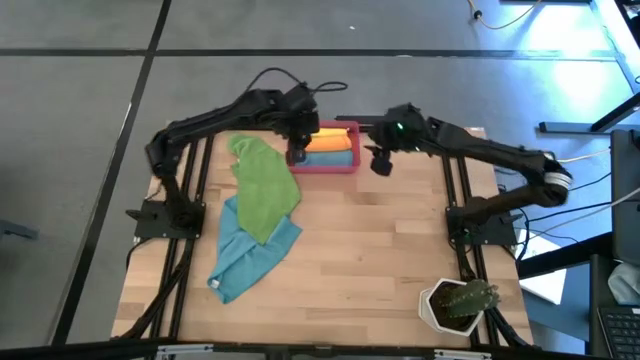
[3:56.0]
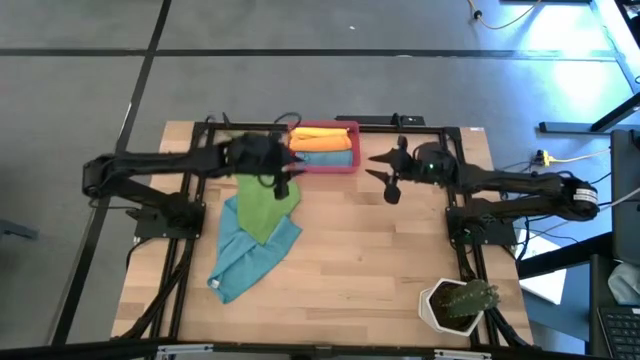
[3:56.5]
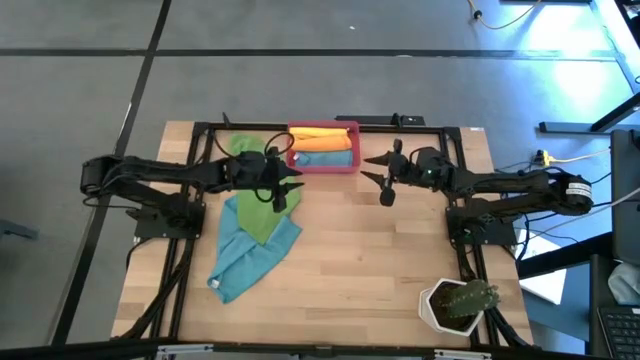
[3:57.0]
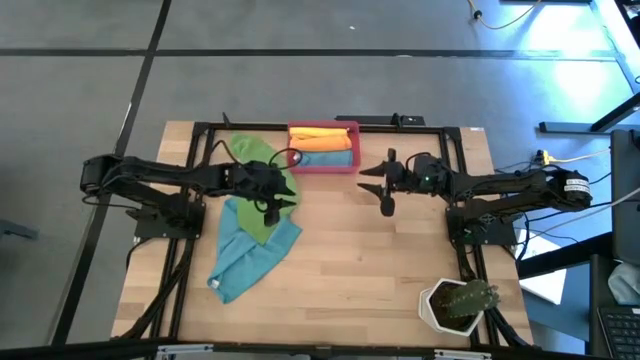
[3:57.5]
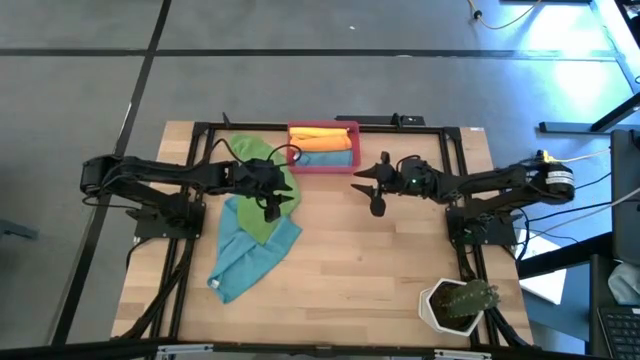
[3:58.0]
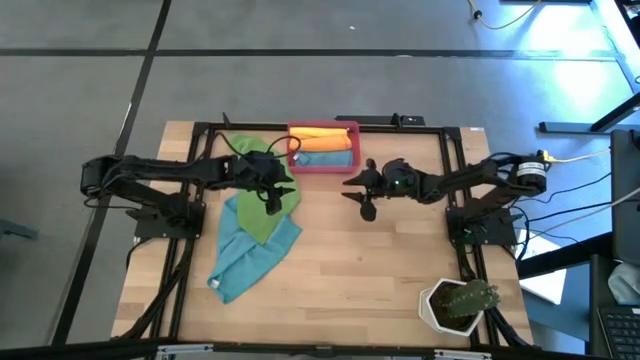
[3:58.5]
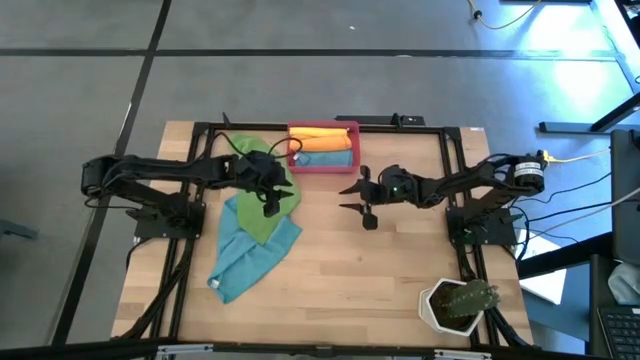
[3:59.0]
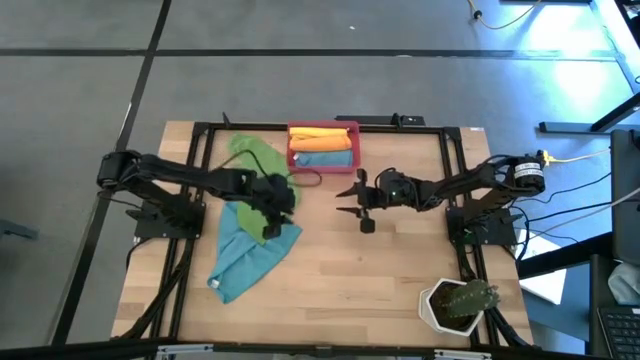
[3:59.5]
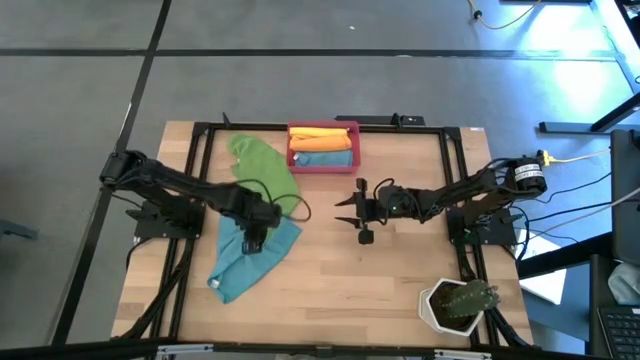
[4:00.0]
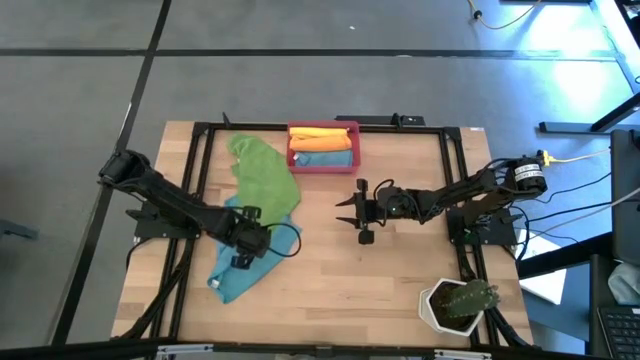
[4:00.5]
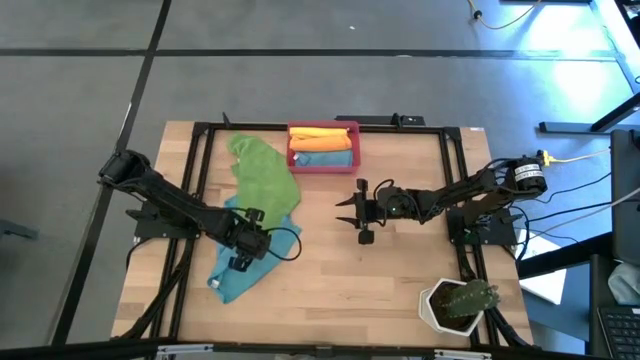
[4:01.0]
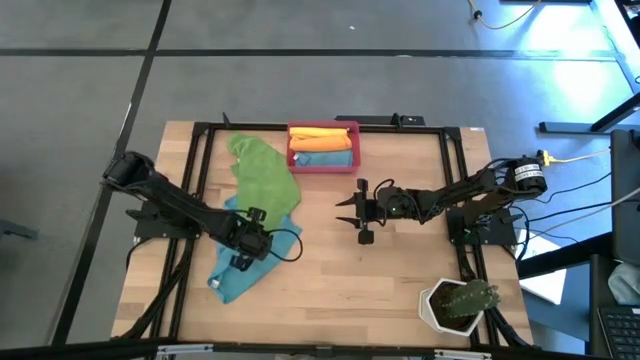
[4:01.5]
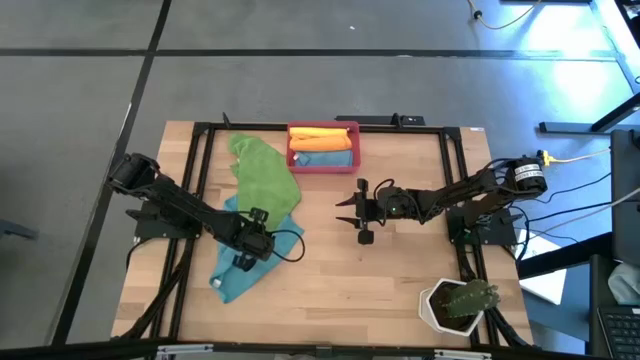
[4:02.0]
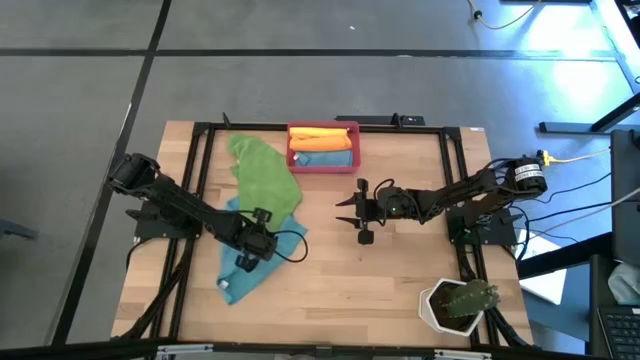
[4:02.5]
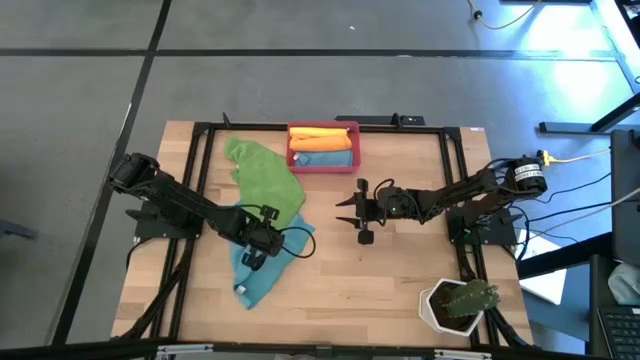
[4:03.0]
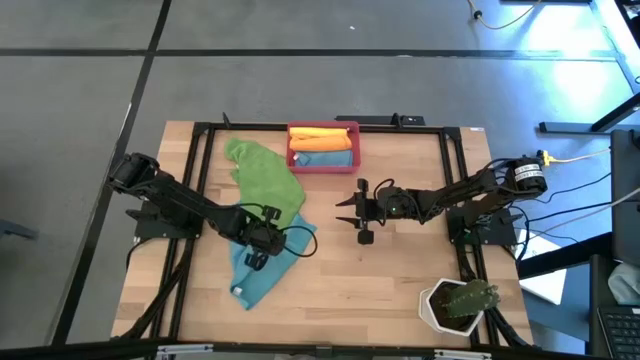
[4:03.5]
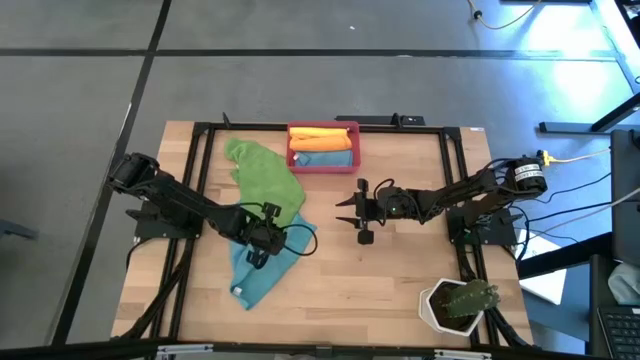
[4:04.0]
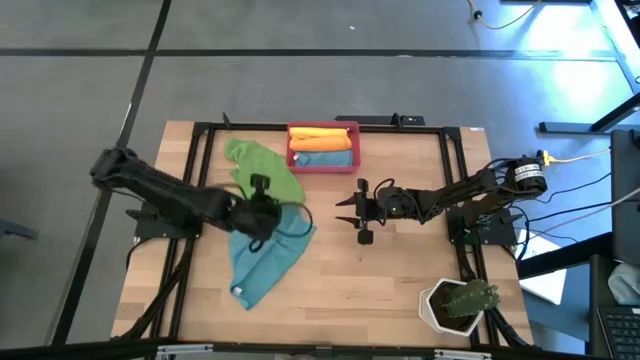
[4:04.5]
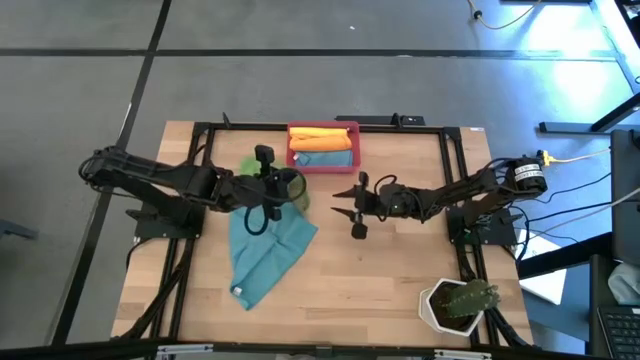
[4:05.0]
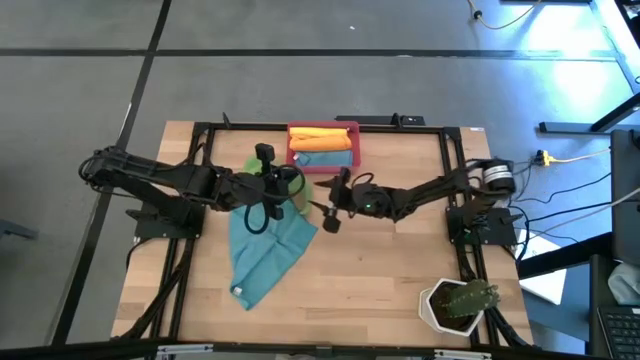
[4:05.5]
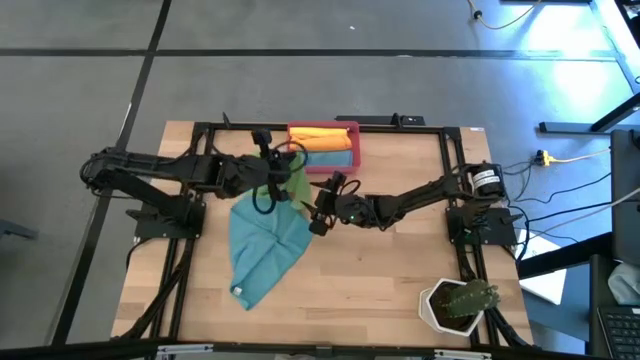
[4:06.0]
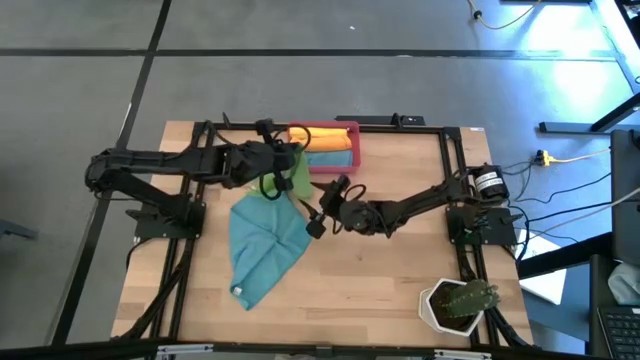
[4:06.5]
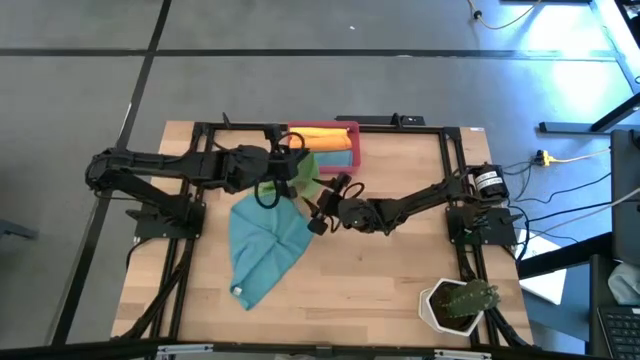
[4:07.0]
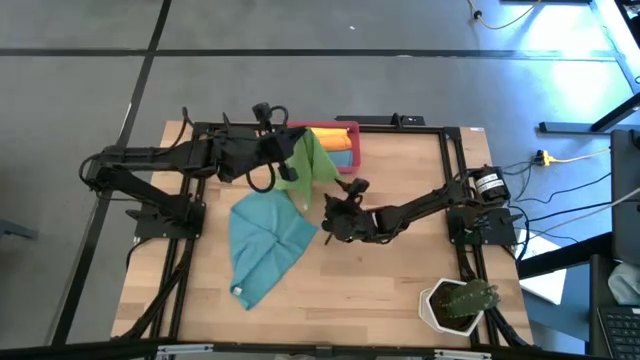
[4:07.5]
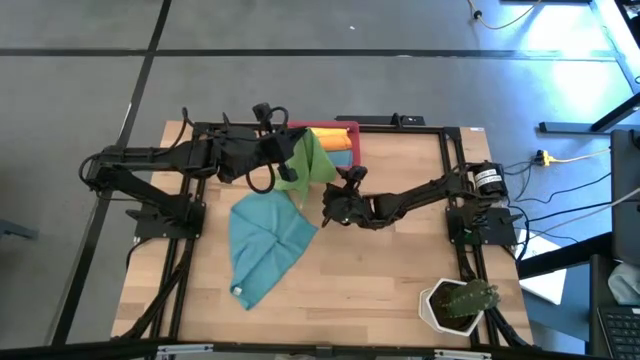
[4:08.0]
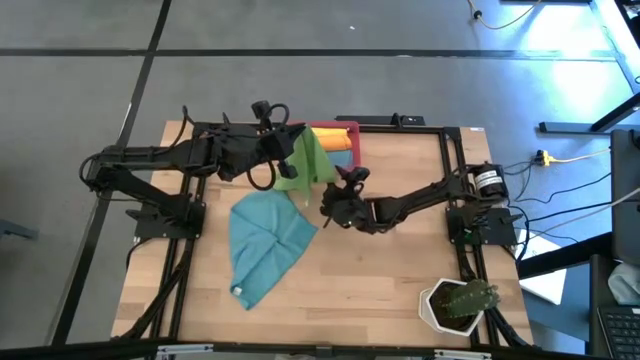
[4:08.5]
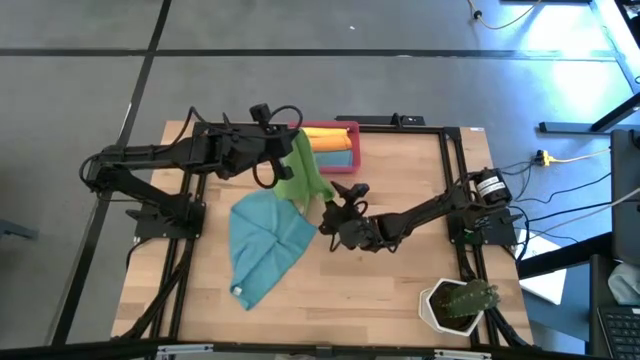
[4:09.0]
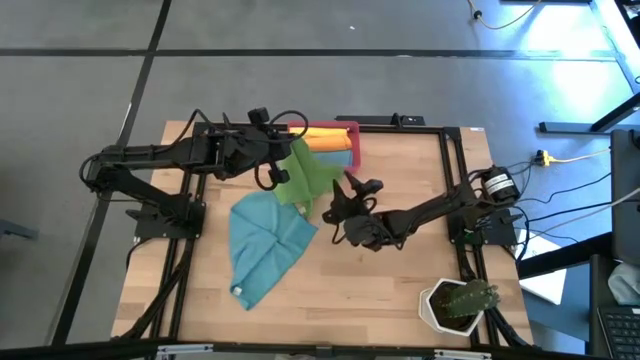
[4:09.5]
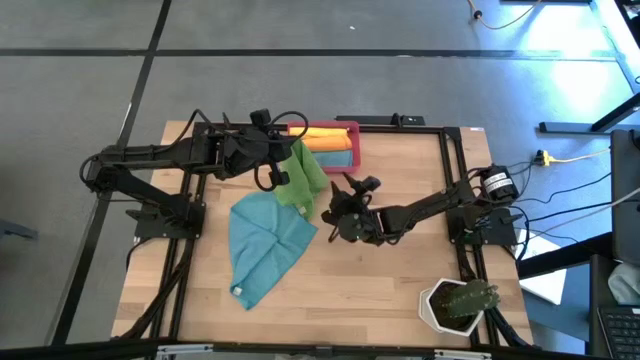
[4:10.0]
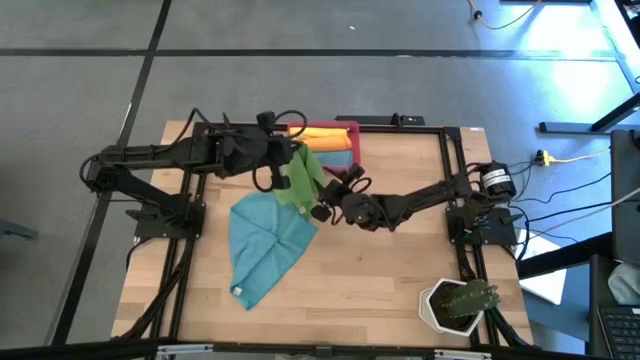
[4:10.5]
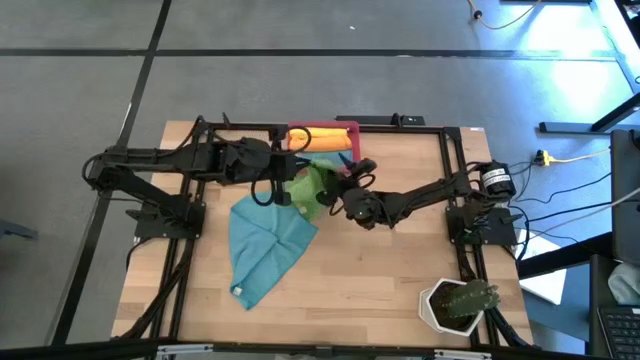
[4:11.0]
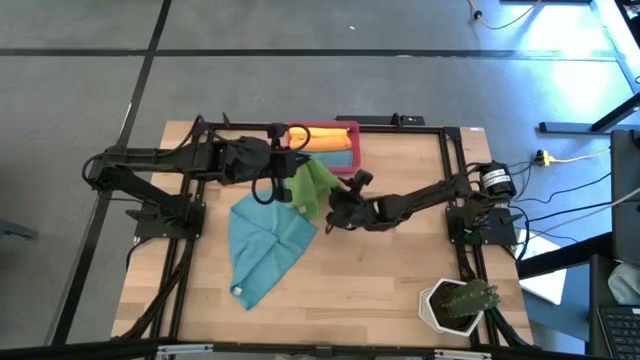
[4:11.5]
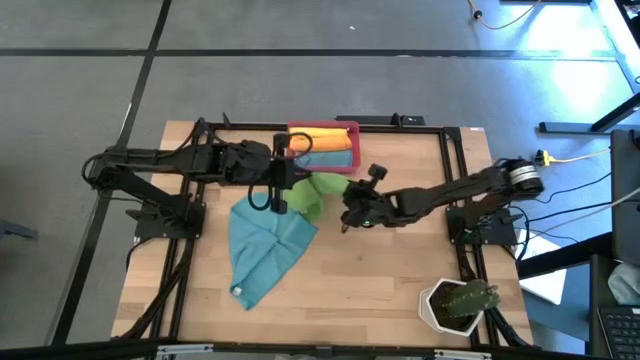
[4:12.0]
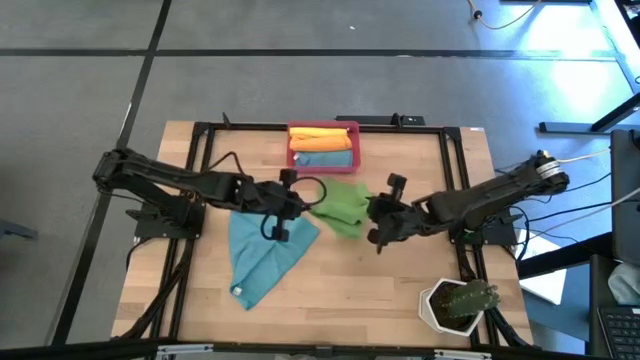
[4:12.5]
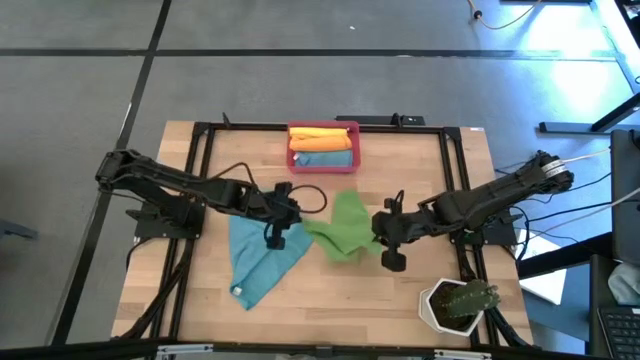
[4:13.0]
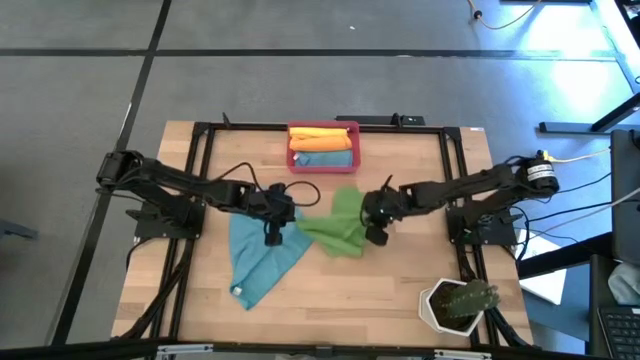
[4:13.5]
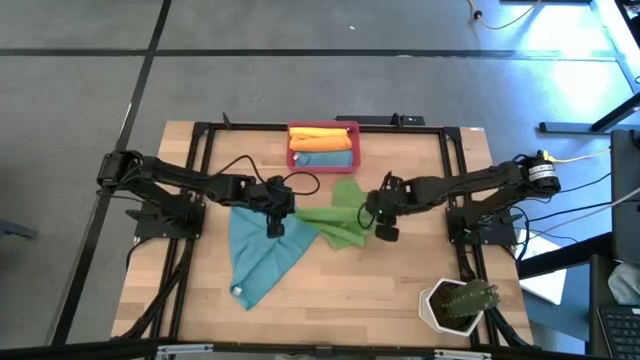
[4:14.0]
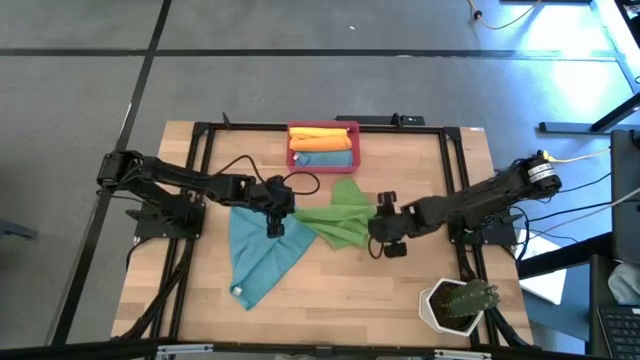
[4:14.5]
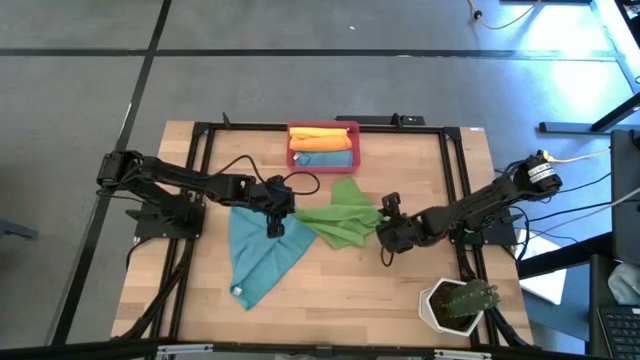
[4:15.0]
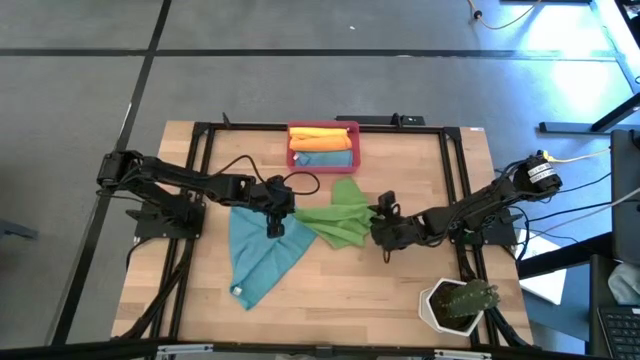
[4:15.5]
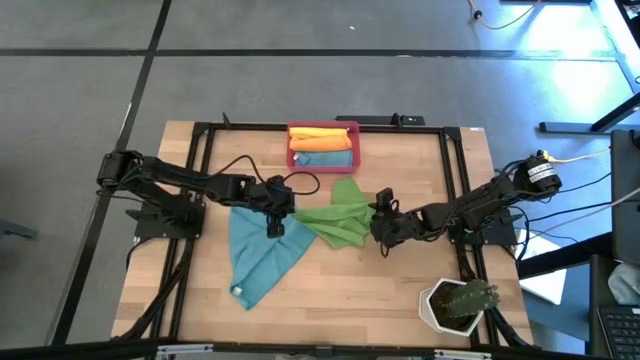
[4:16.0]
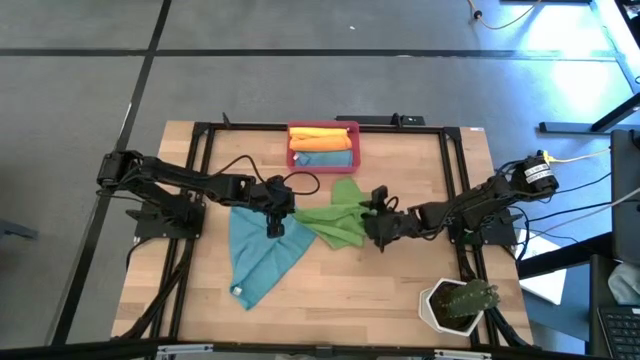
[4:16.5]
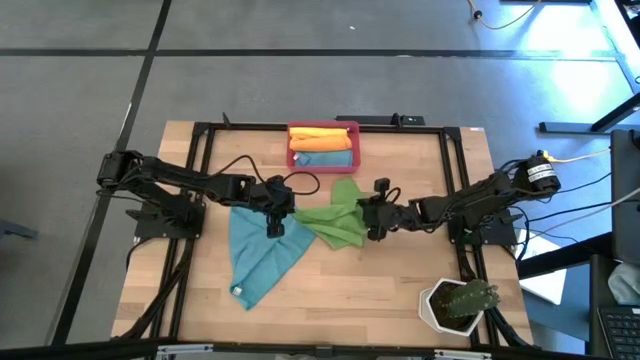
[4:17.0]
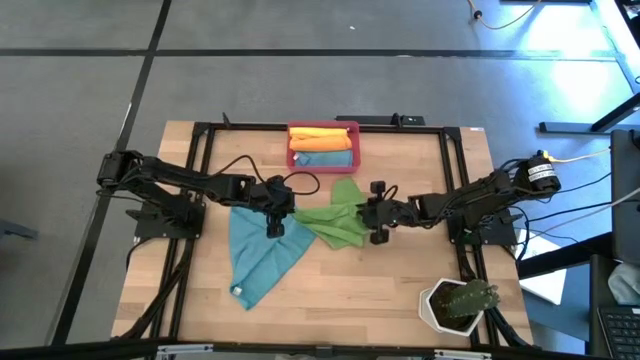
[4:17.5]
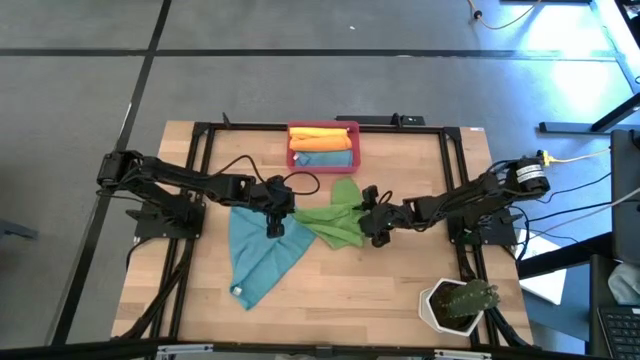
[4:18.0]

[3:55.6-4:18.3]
Task: Roll microfiber towels into tight, uniform cylinder then place into a basket
Fold the green microfiber towel

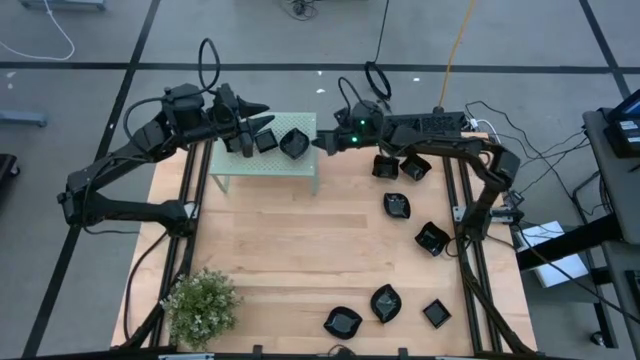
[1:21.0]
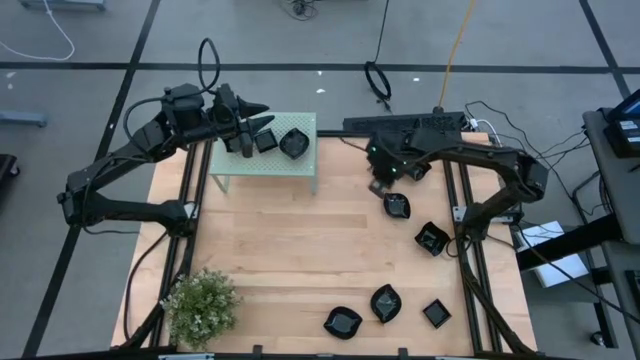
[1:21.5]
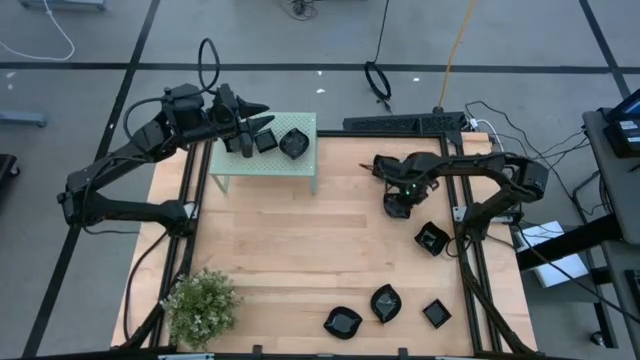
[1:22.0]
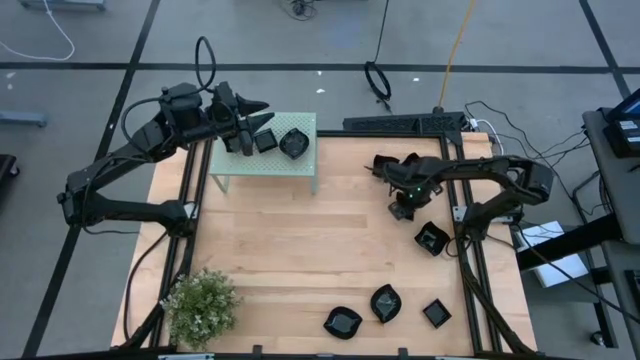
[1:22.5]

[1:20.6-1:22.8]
Task: Pick & Place Mini shaped plates
Stack the leaf shaped plate on top of the leaf shaped plate on the shelf
